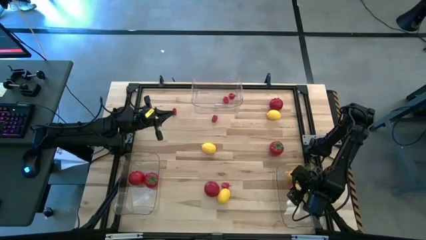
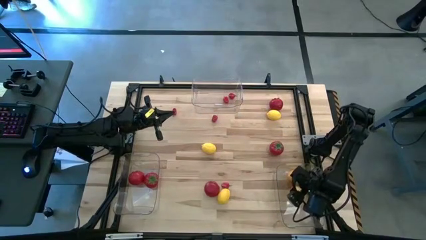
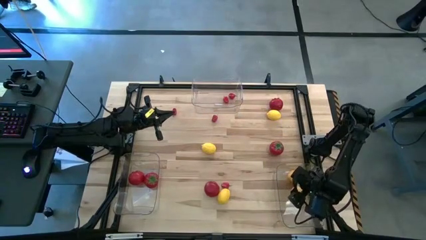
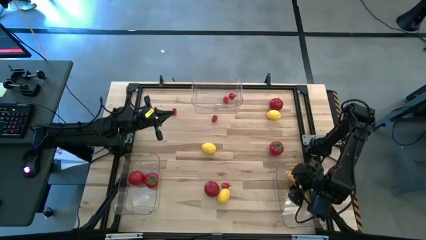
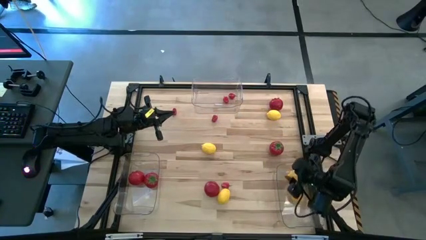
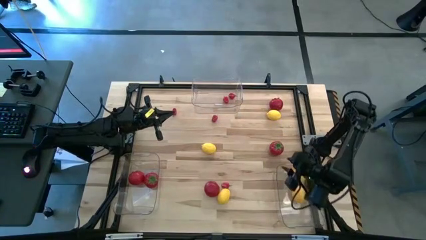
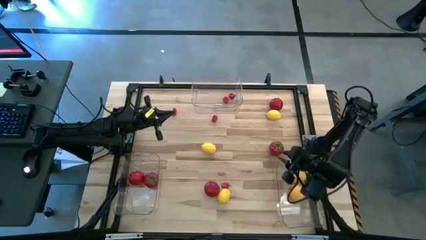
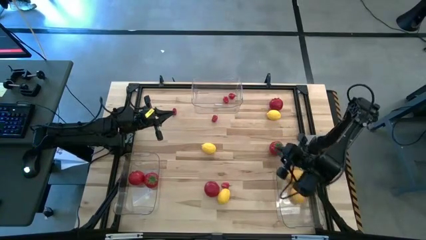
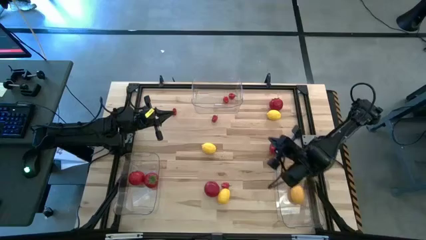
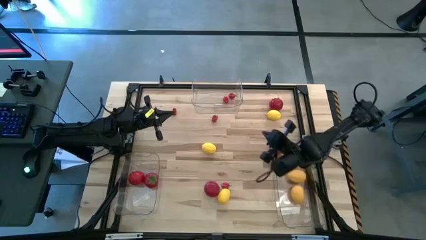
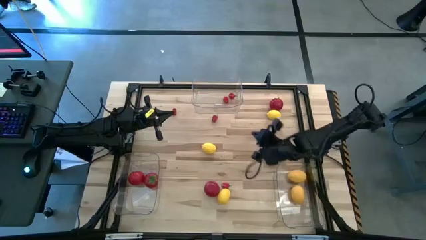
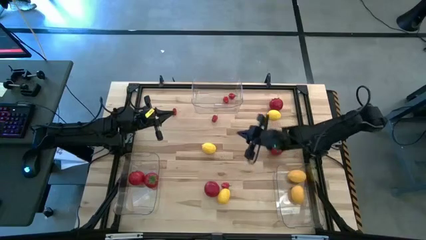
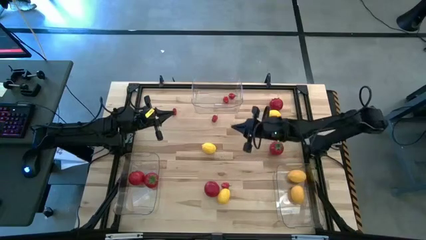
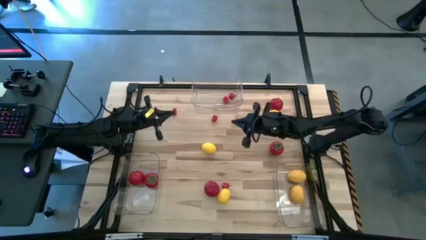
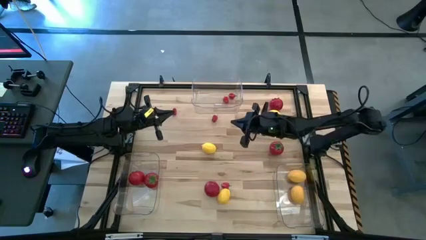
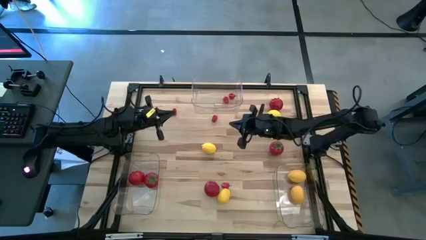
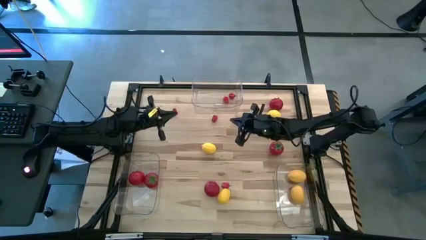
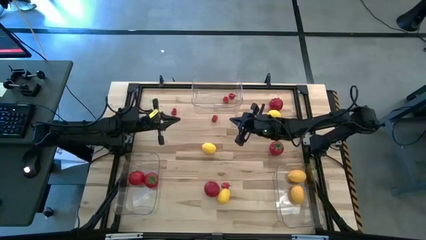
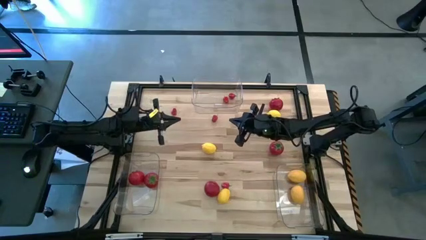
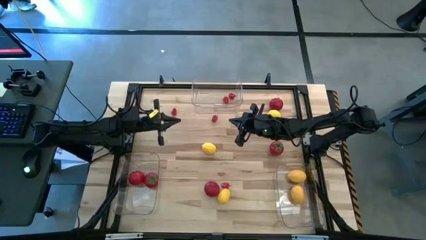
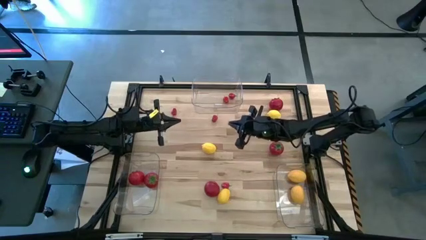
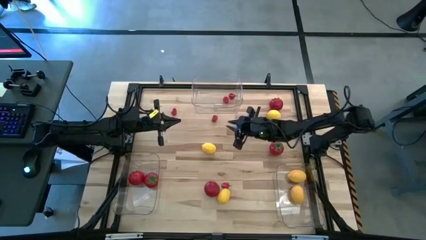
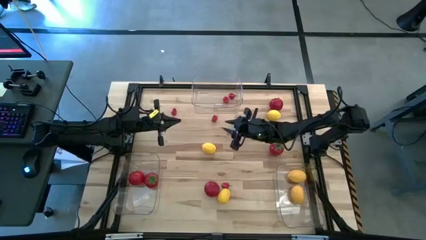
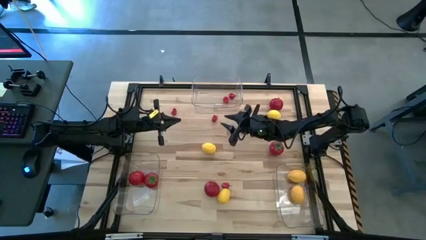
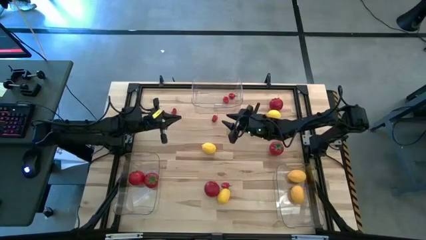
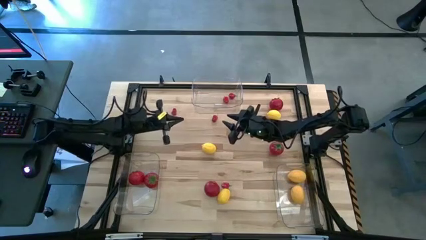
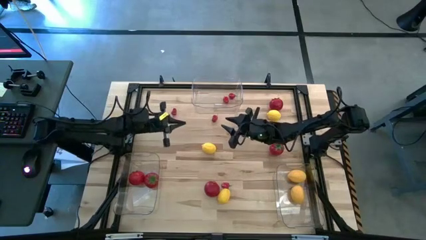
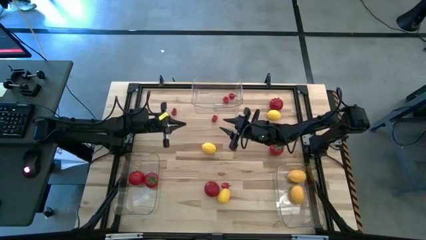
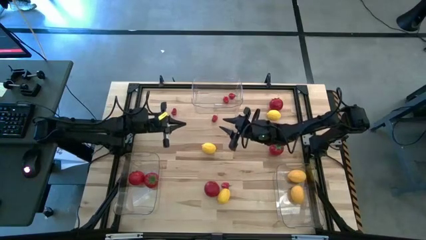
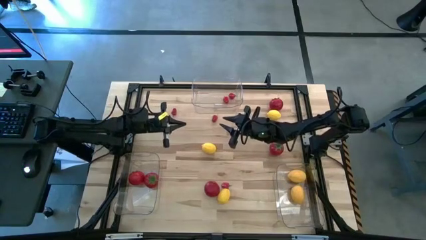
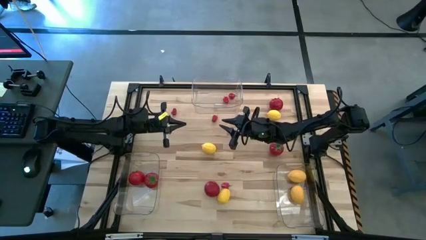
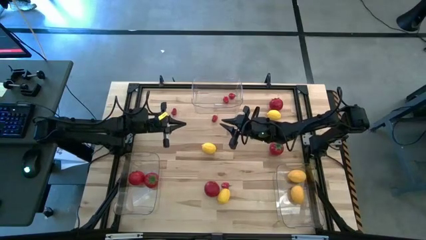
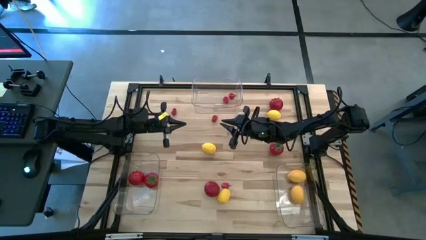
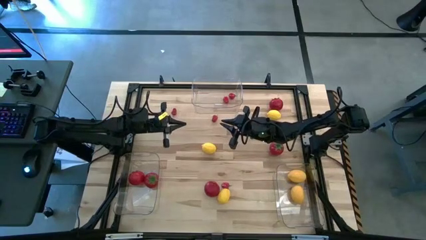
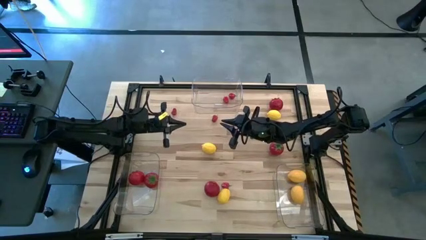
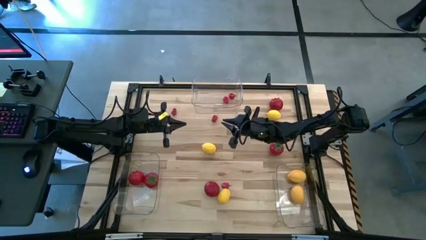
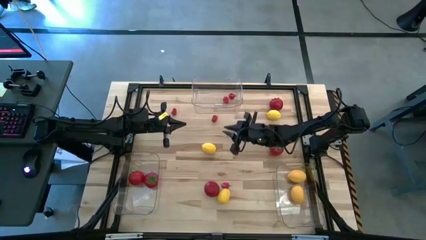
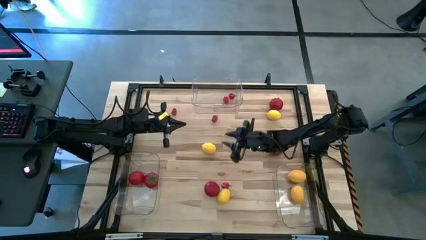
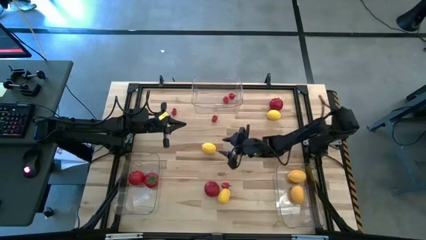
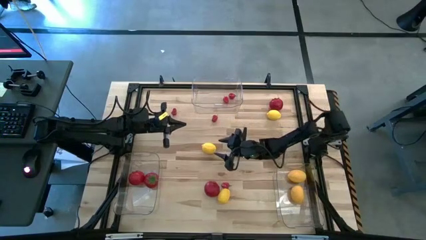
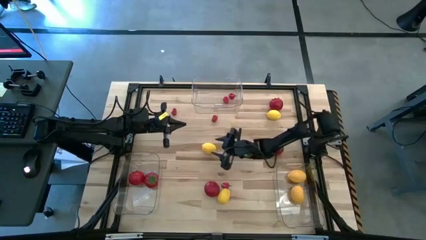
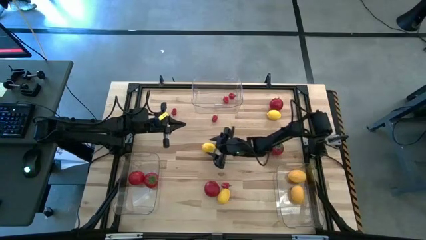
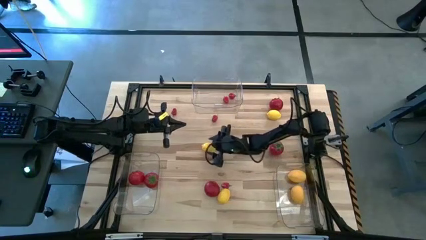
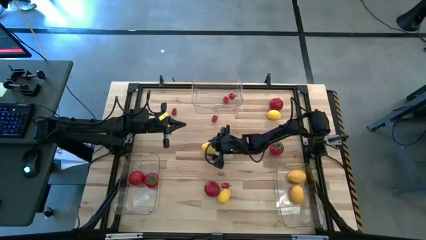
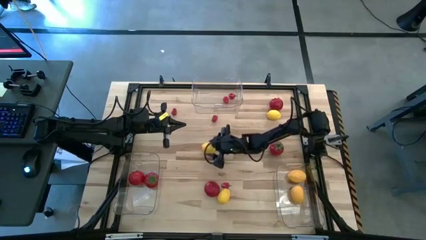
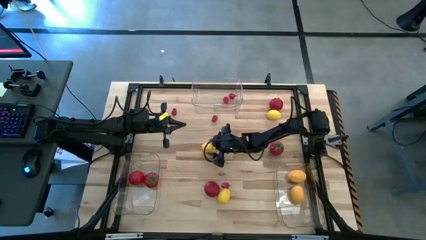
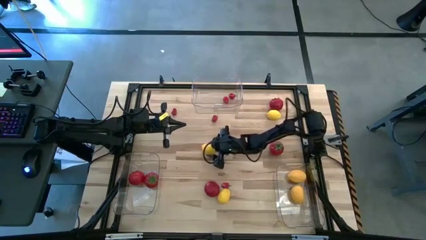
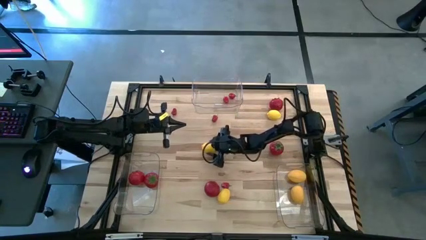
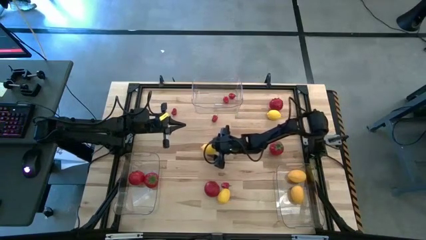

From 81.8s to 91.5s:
Task: Sort produce into baskets
Put the yellow lemon into the bottom right transparent bin

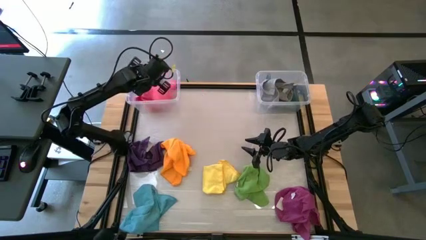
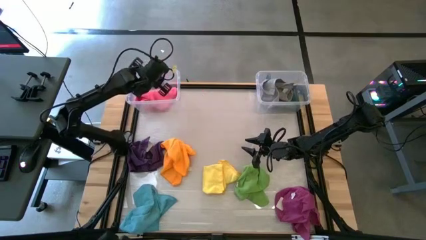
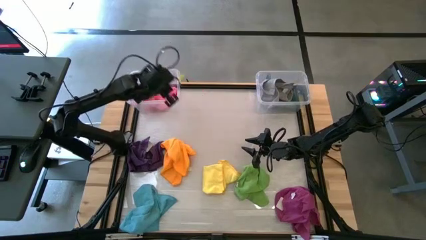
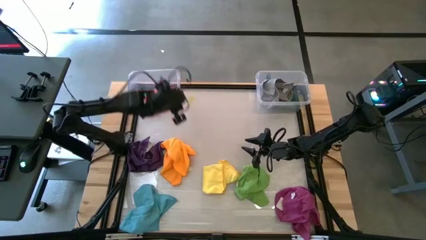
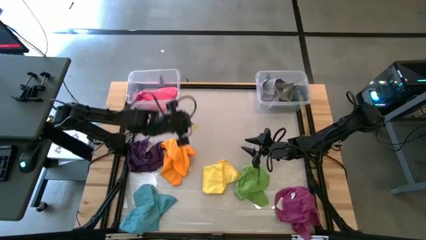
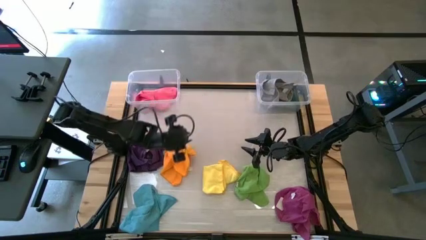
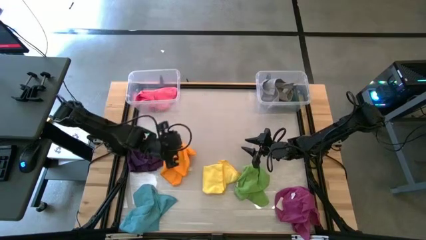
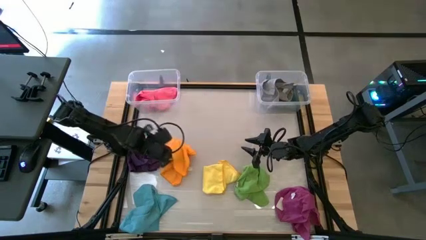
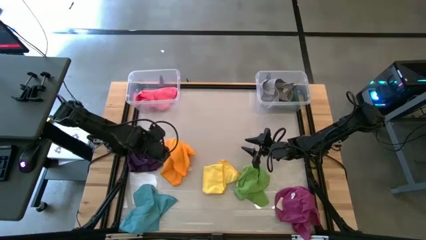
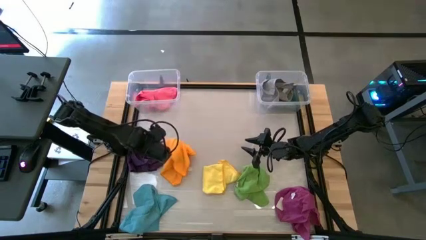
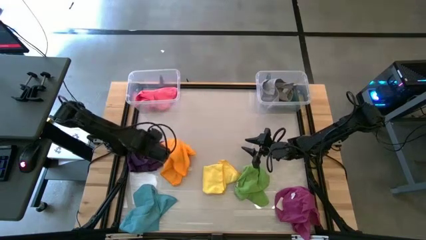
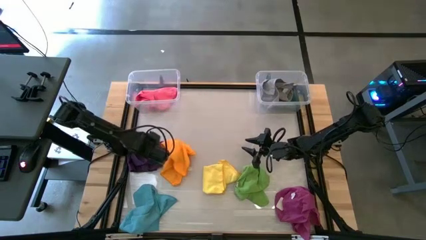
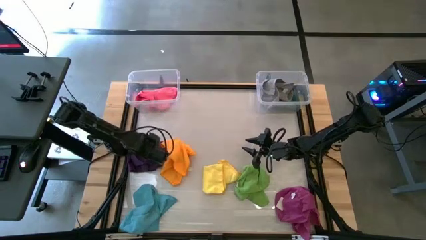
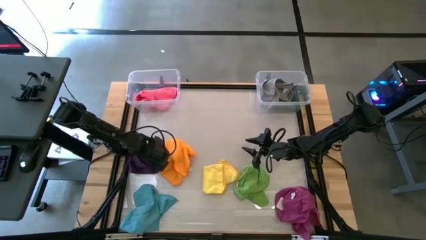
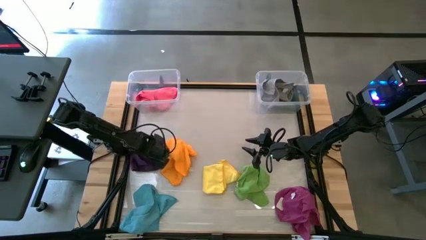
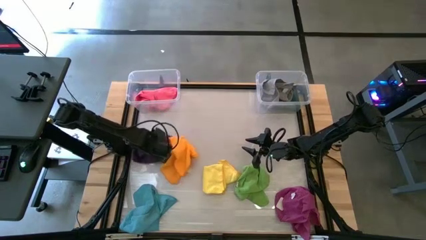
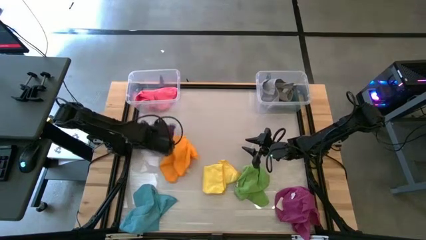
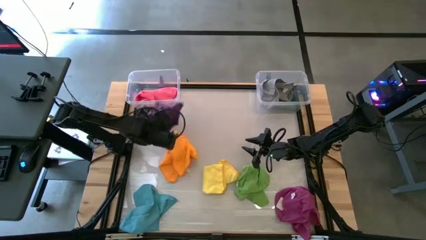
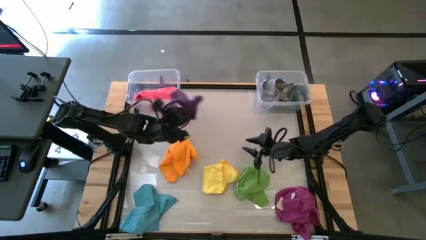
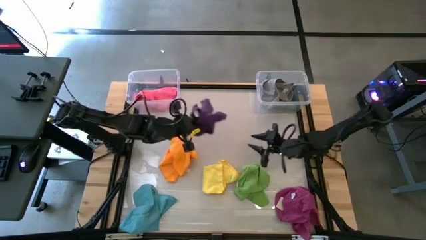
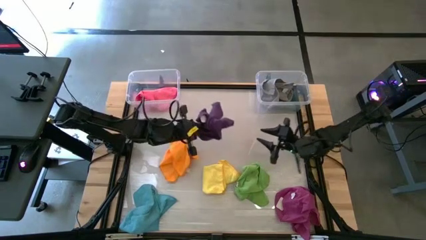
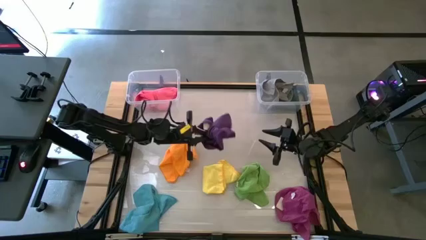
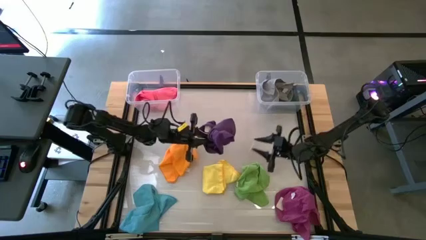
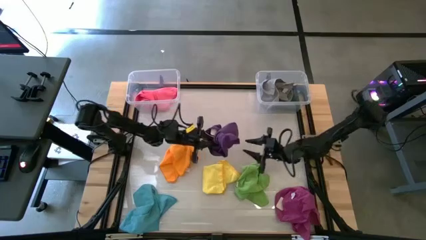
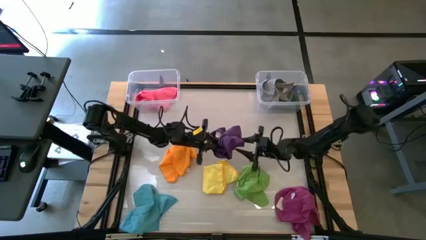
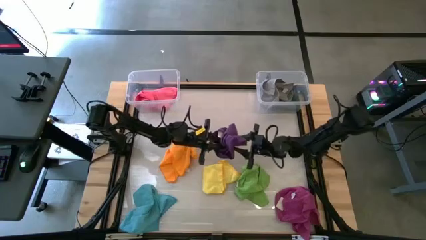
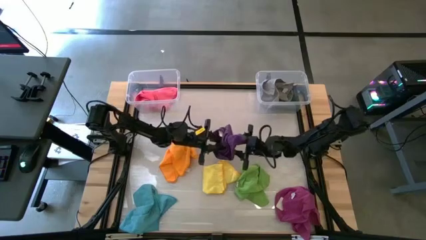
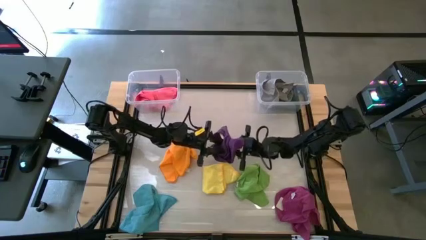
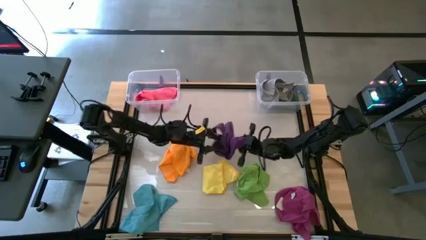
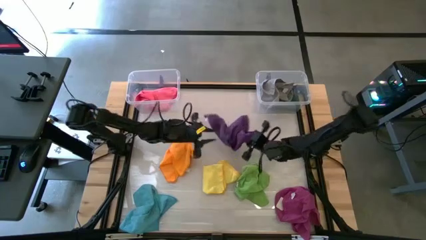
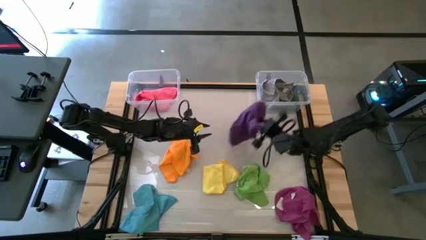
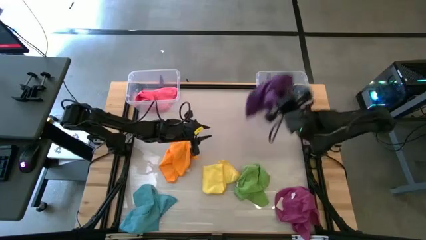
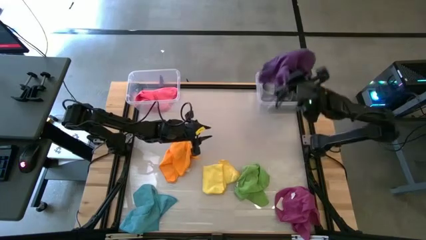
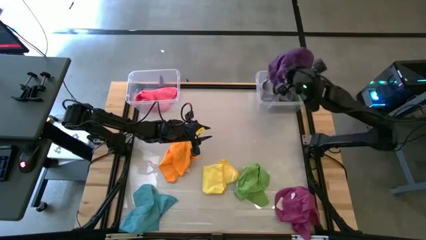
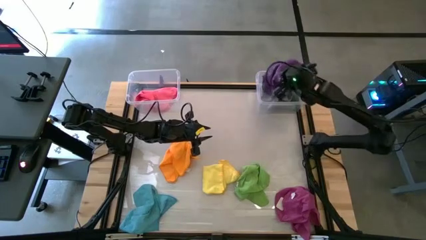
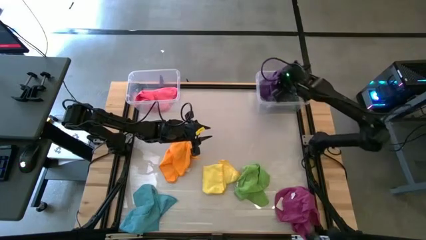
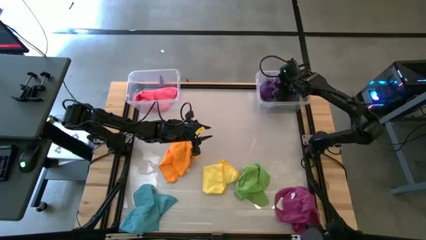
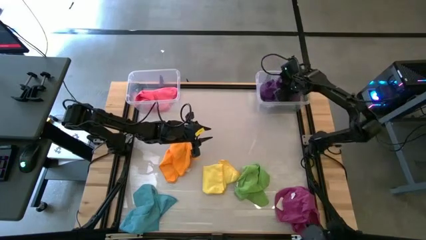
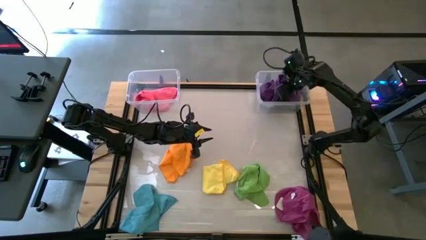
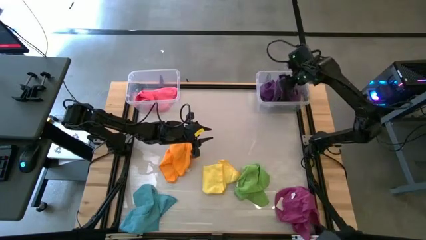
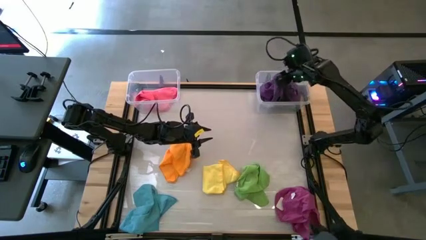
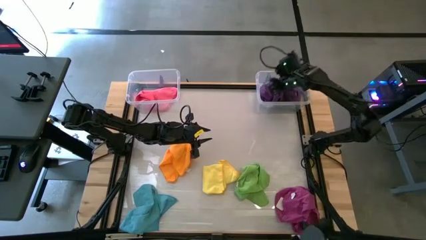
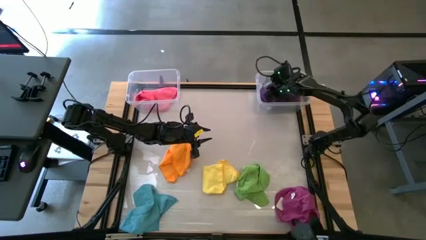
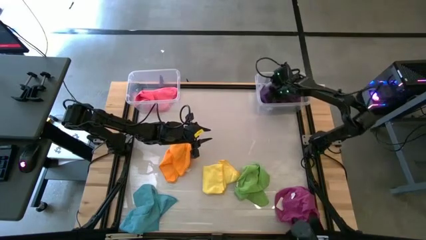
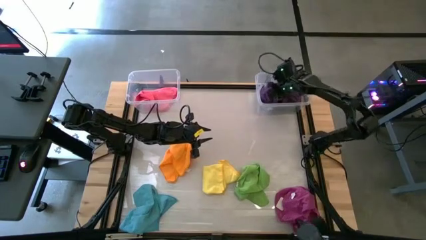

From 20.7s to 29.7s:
Task: Sort towels by color in basket
Put the violet kitchen towel into the right transparent bin
